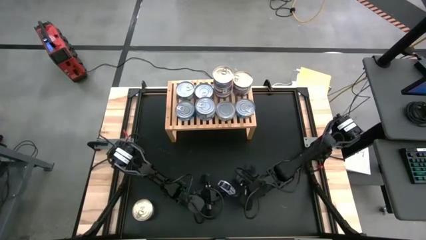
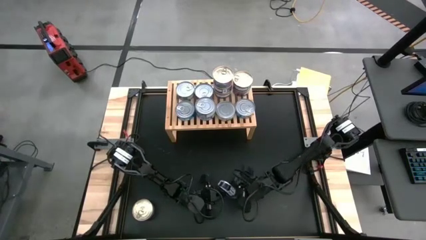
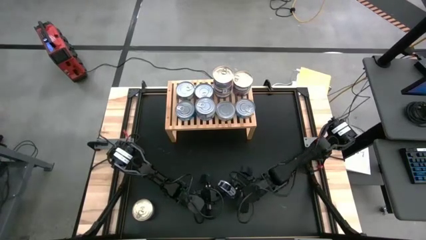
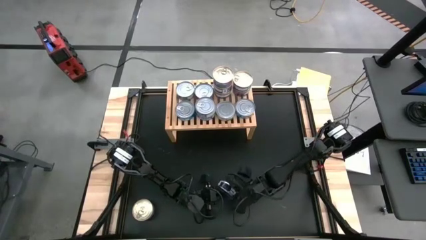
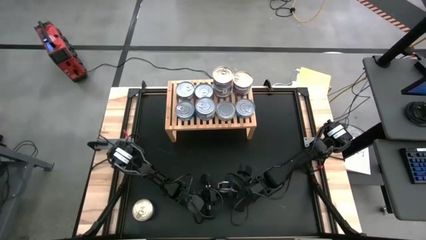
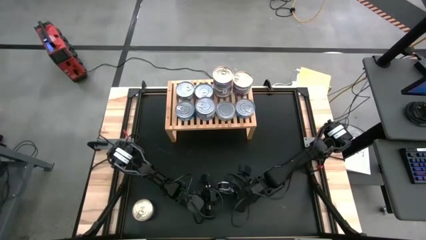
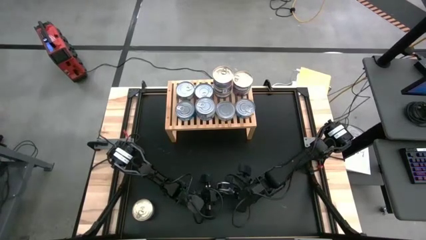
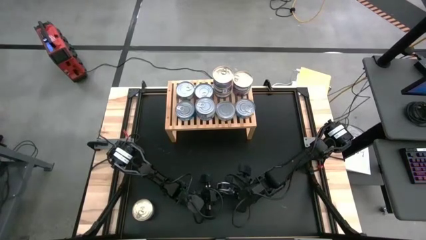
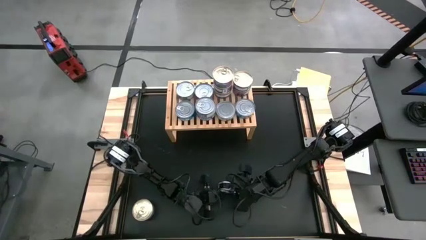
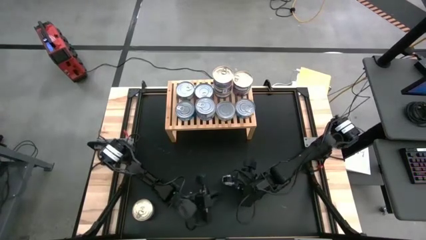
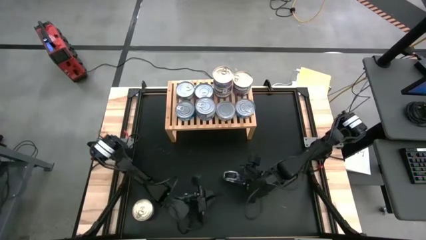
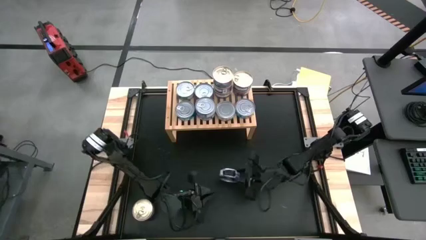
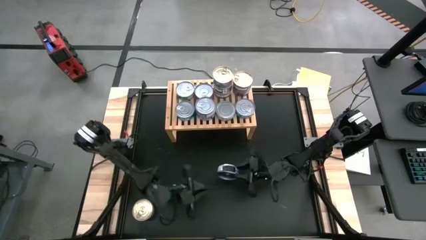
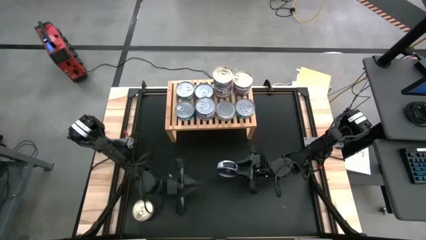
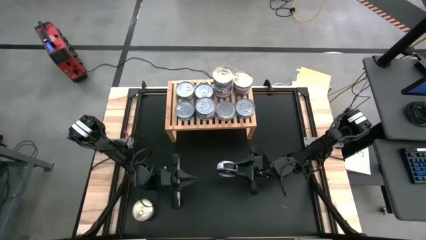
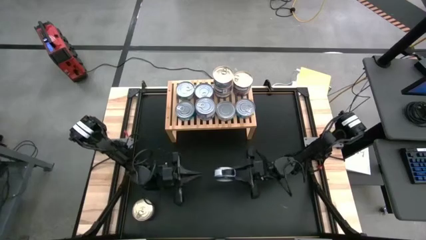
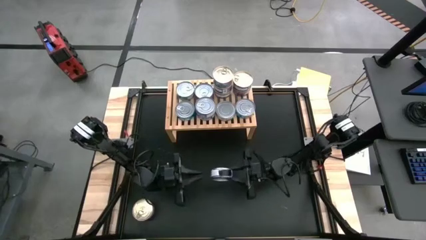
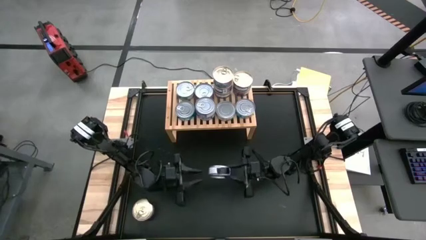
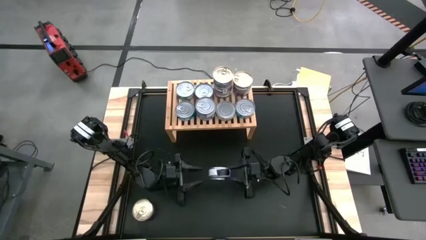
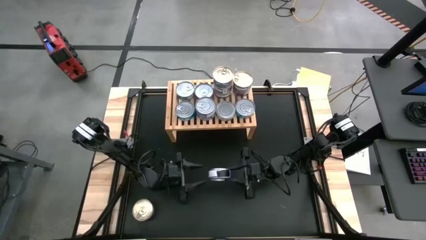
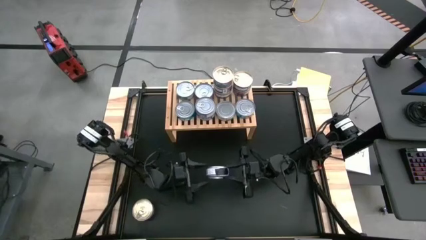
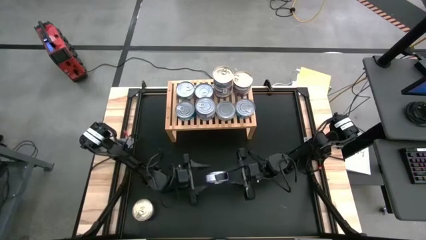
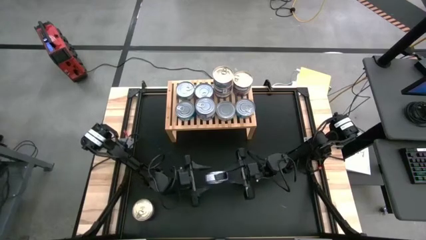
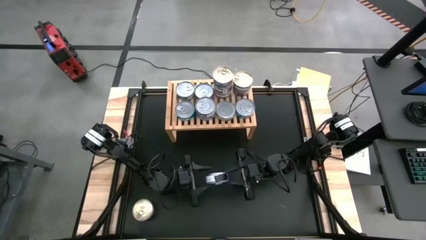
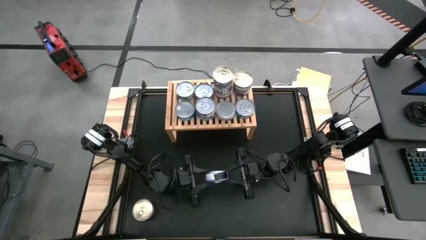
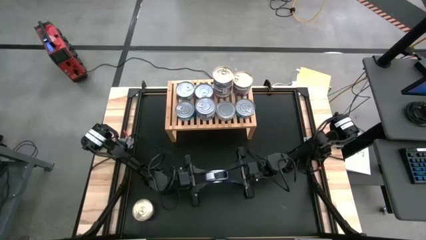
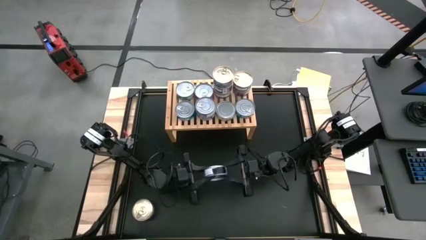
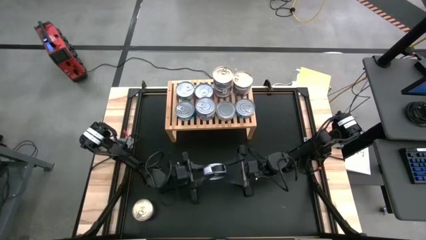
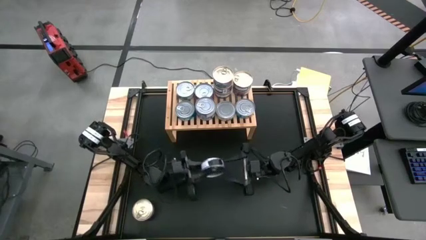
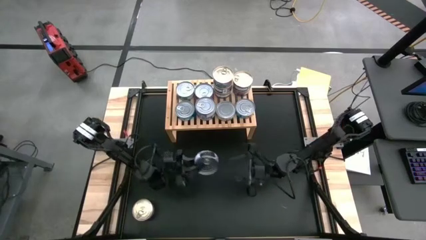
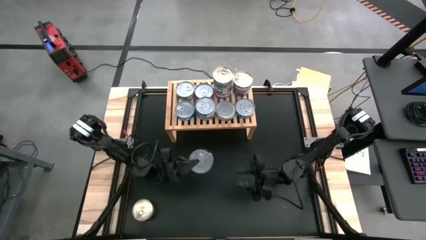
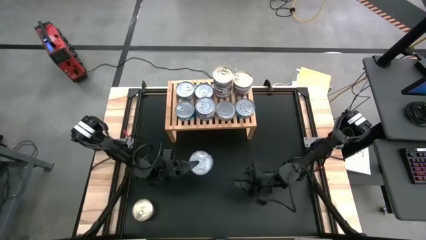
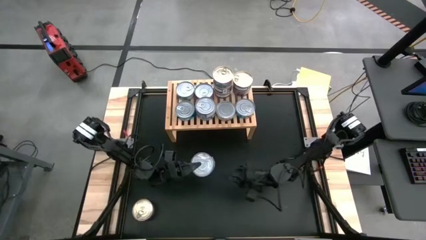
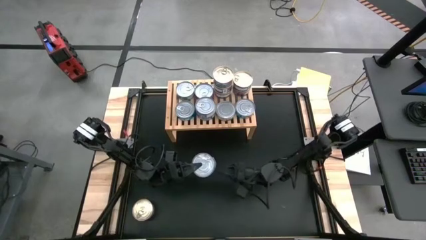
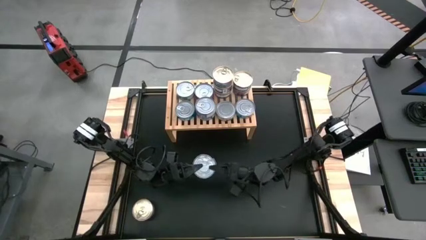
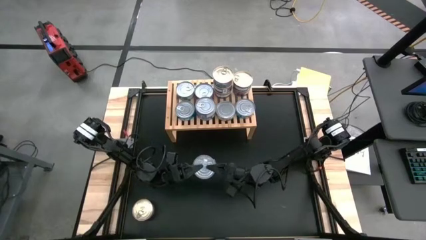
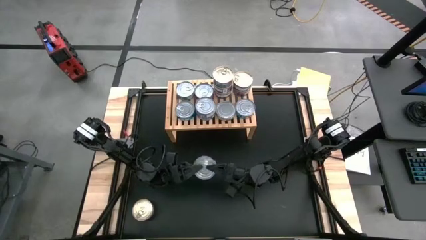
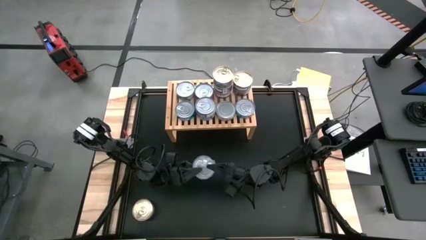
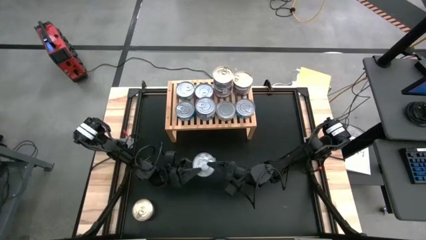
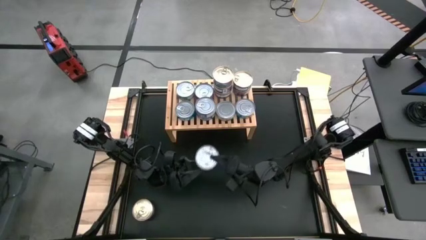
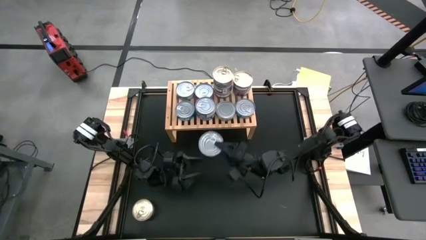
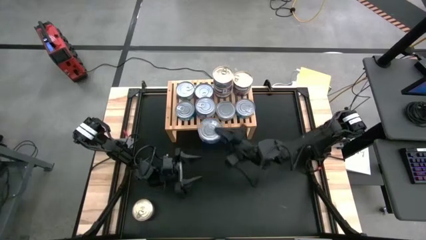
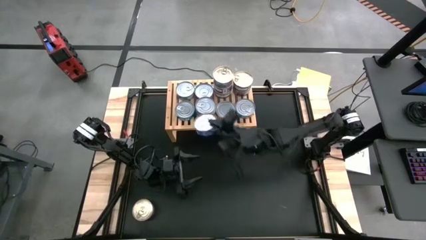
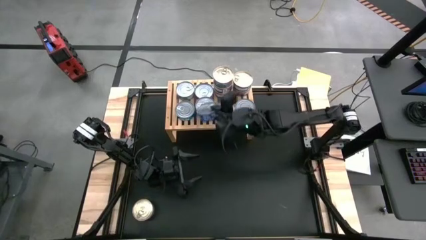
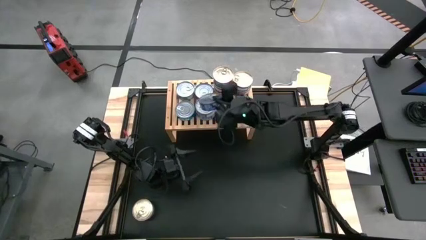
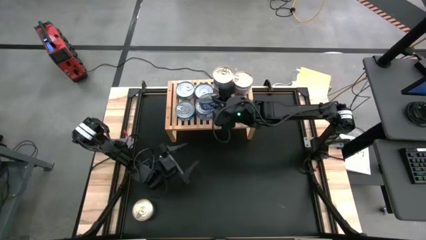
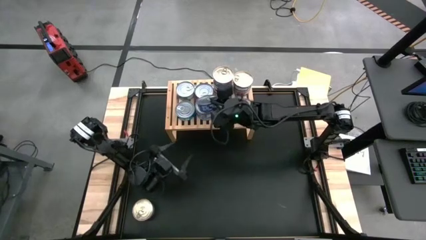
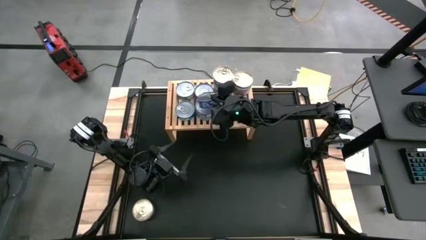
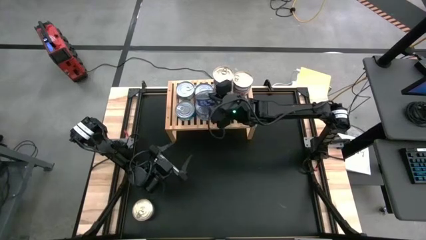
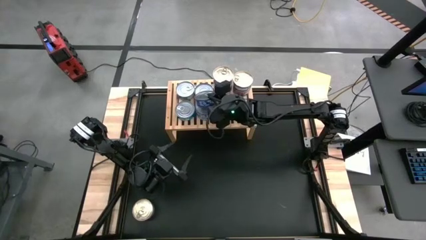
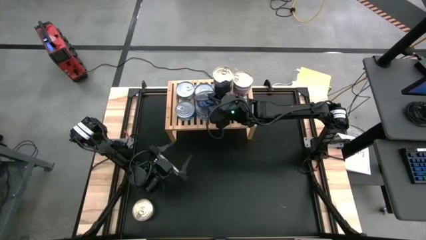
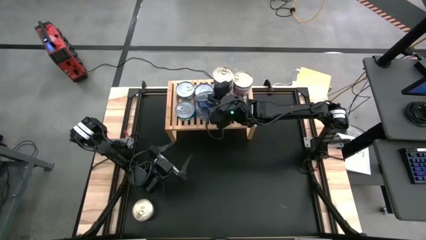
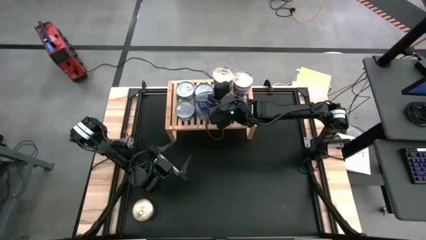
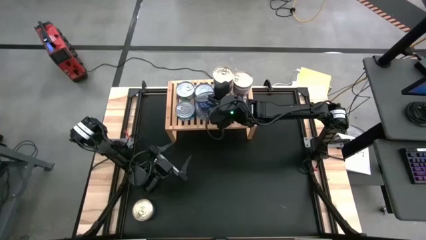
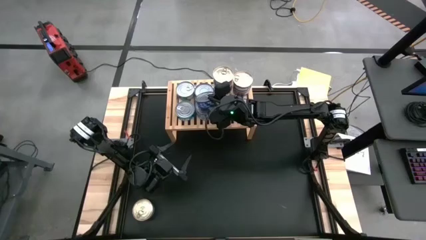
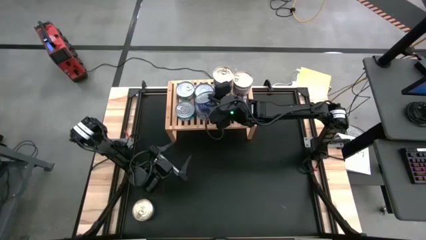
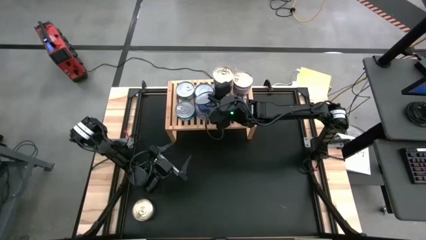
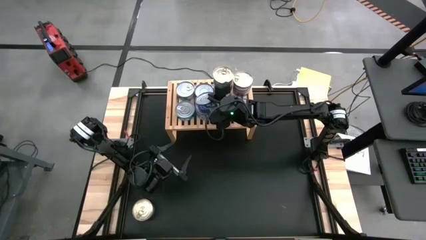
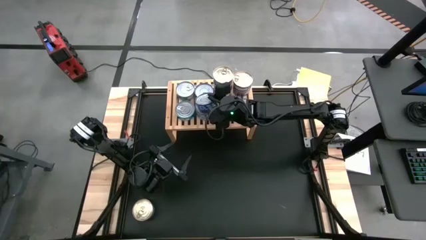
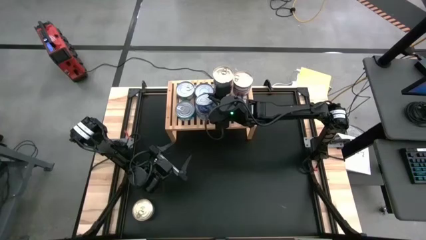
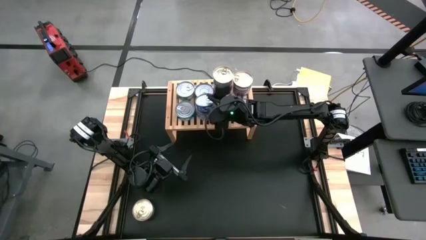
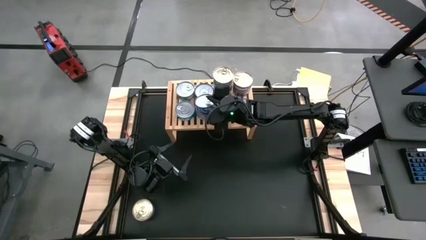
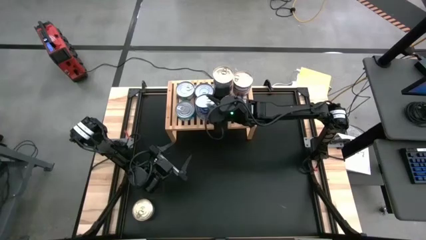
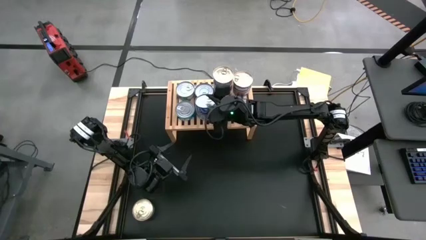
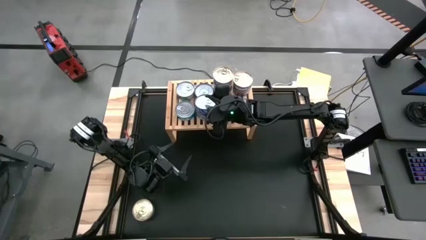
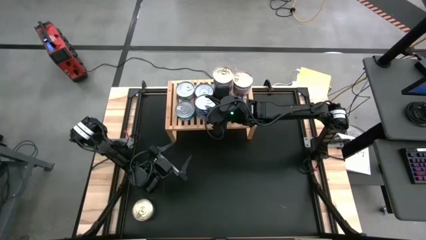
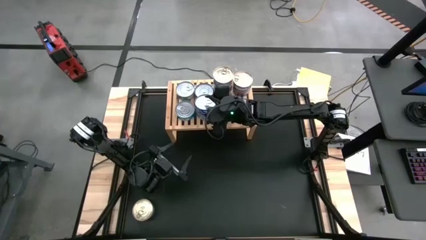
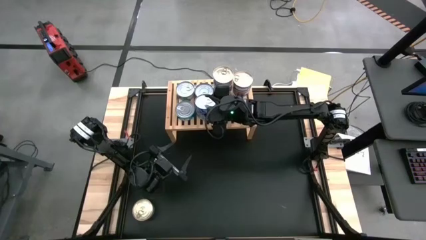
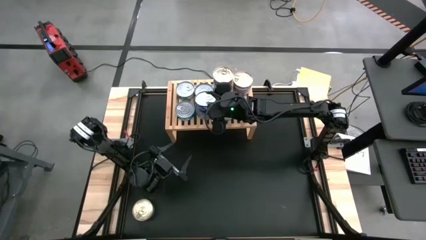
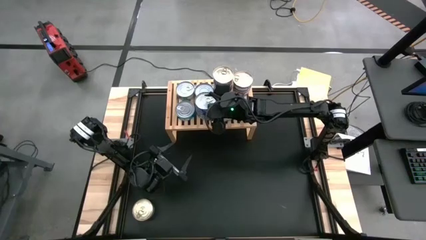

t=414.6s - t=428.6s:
Task: Stack canned seafood by type on shelf
Stack the blue tuna can on top of the blue tuna can

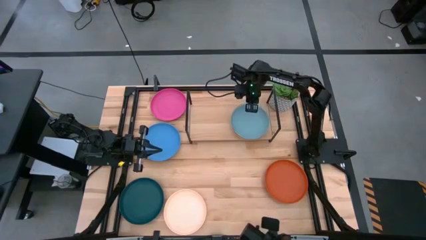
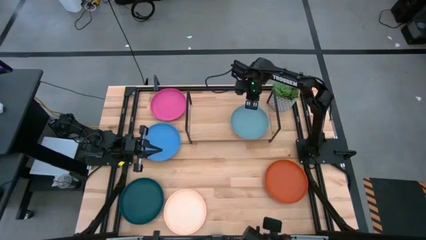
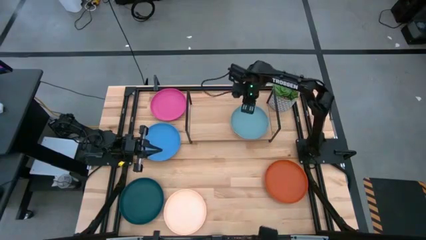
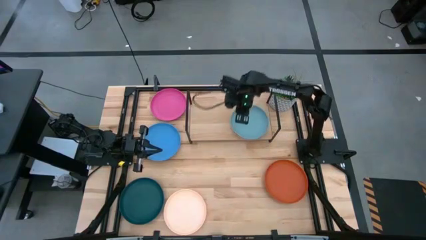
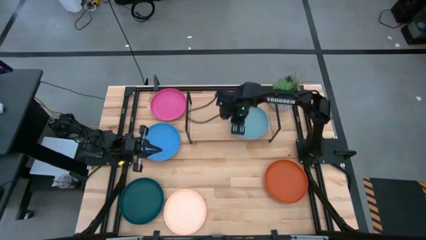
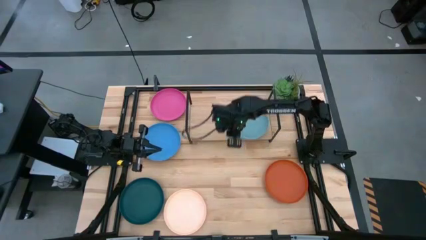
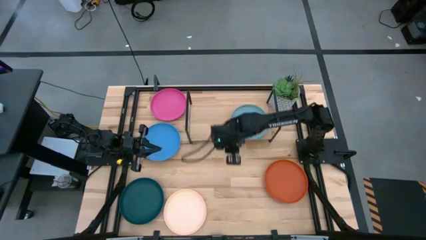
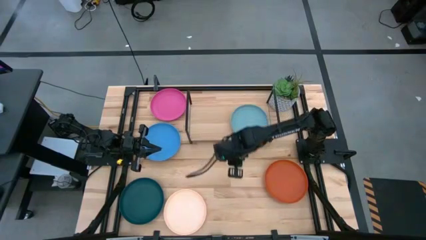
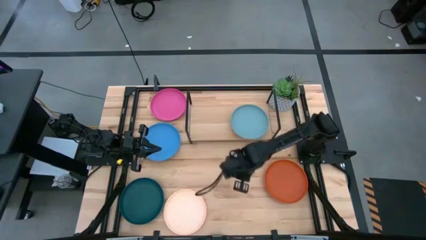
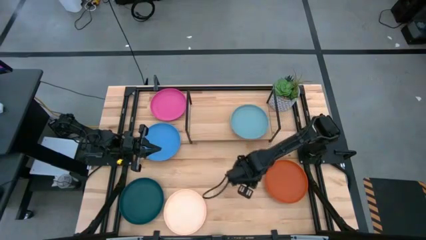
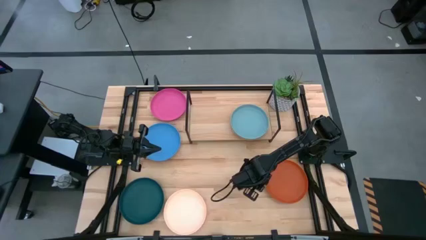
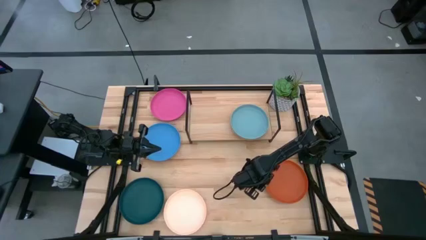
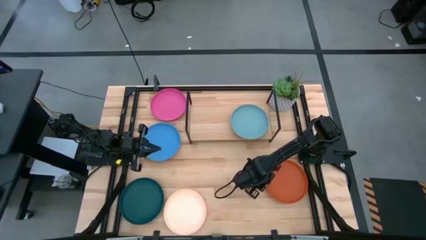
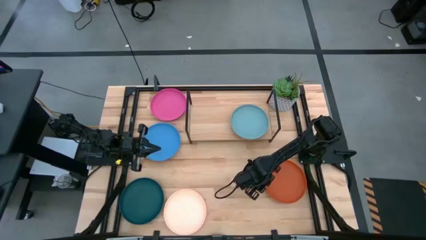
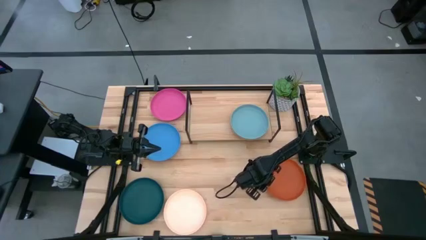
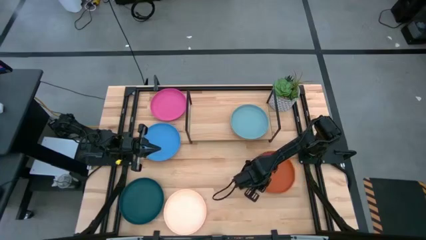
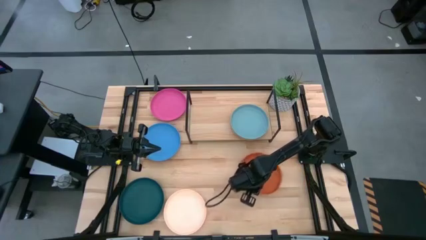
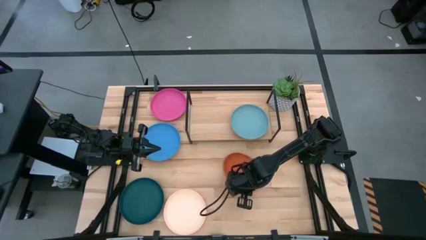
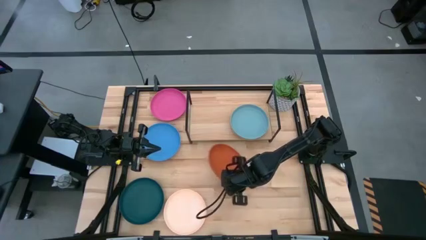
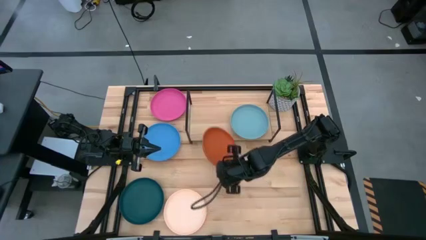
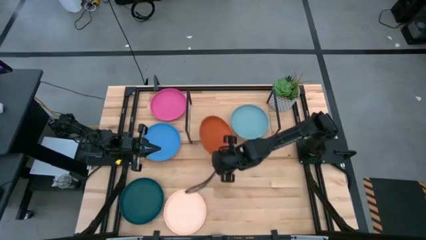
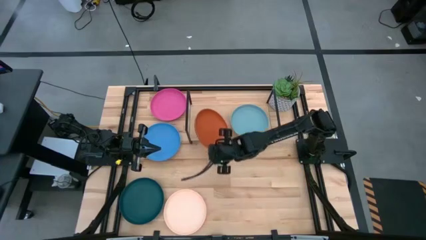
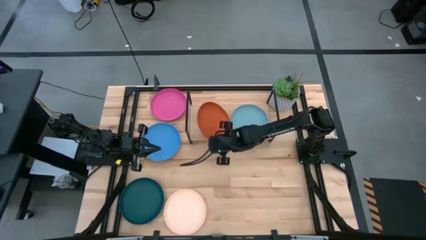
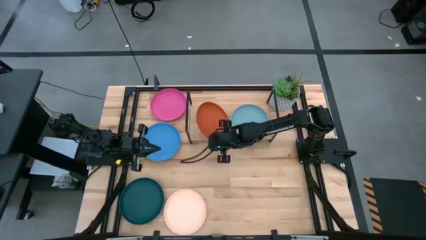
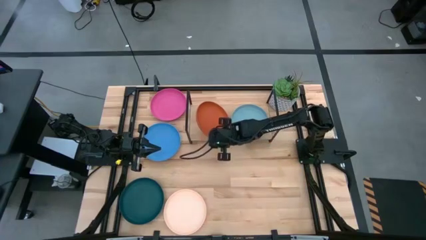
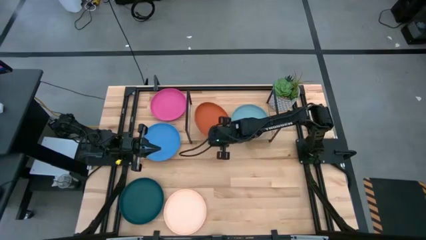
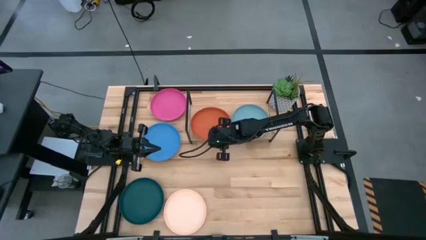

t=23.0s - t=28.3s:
Task: Place and stack plates onto a shelf
Put the orange plate on the shelf
